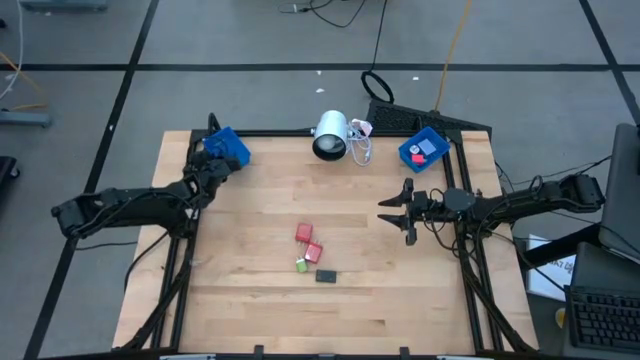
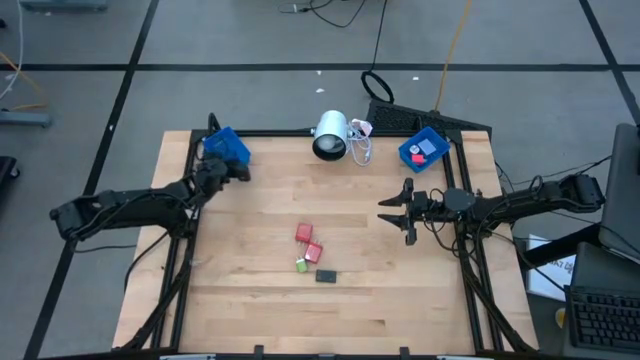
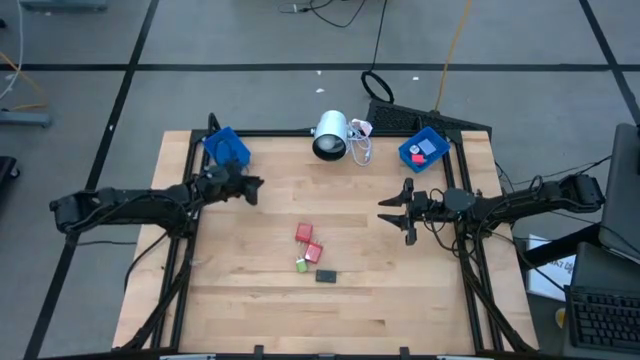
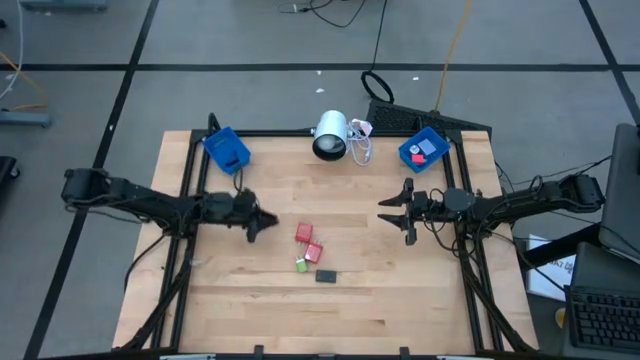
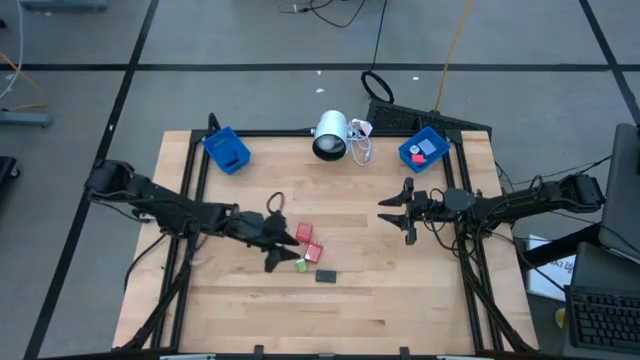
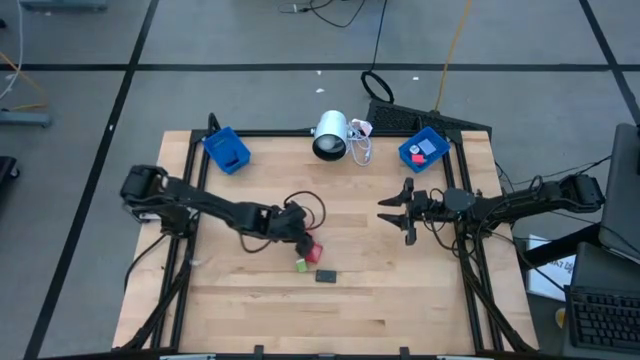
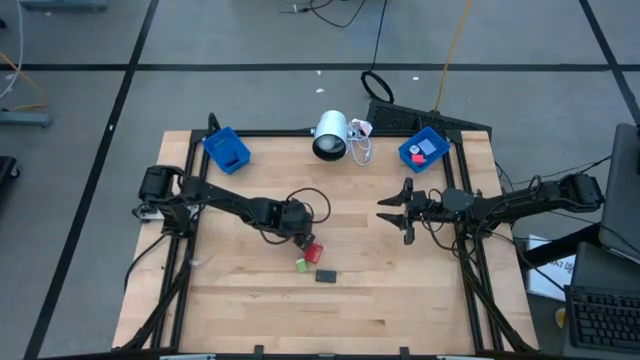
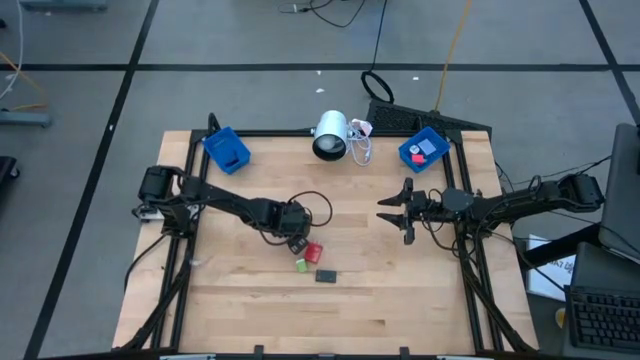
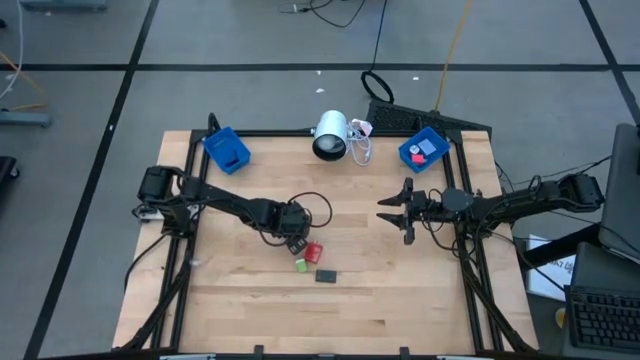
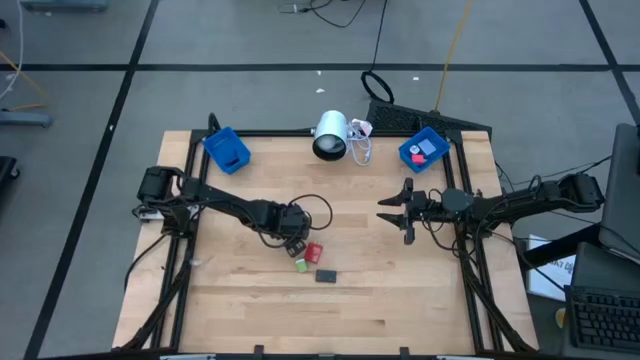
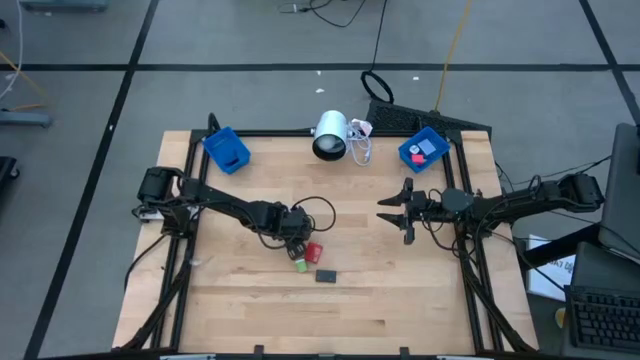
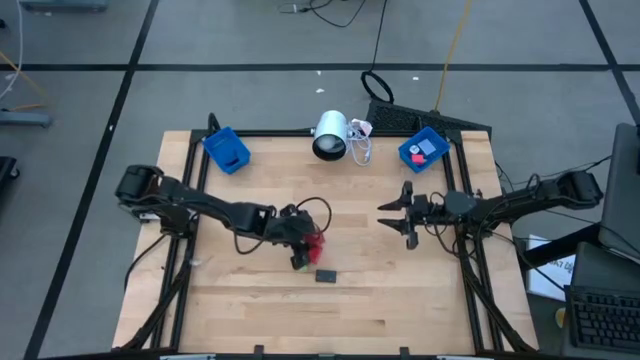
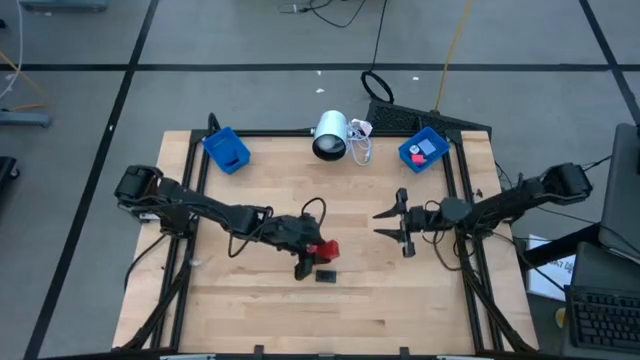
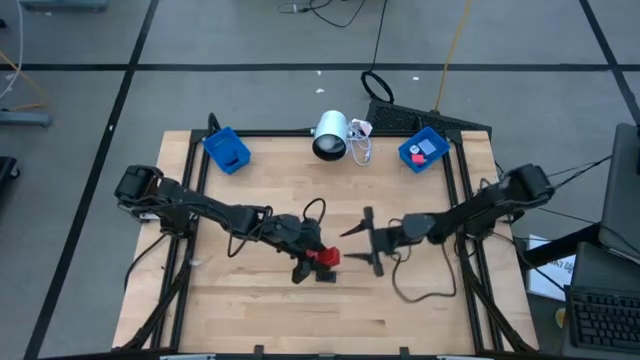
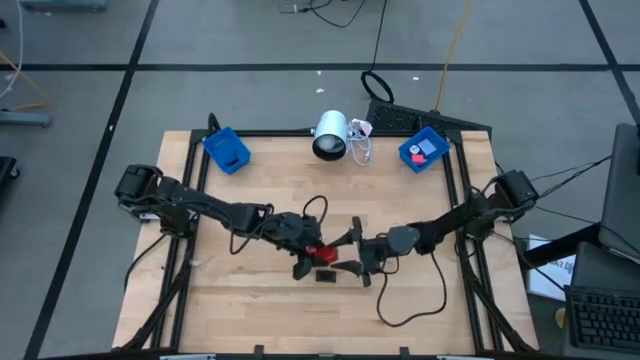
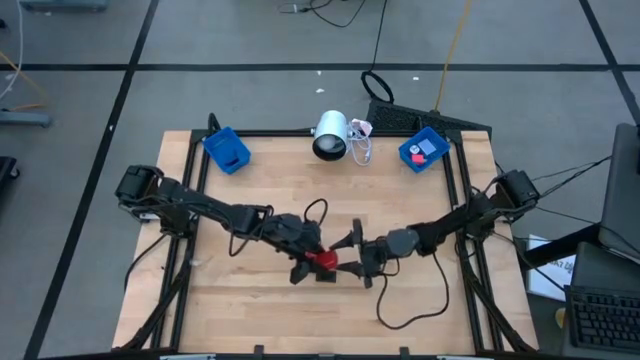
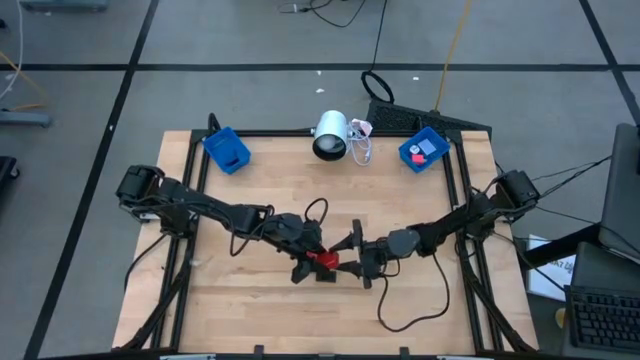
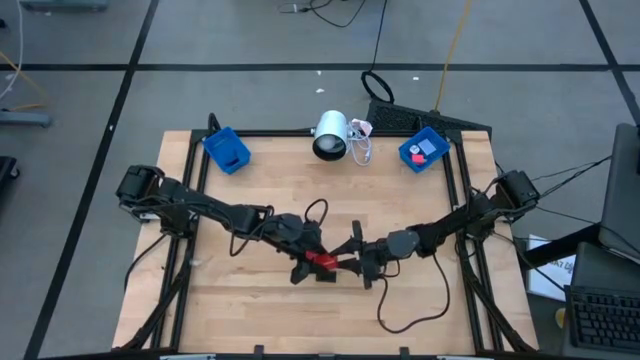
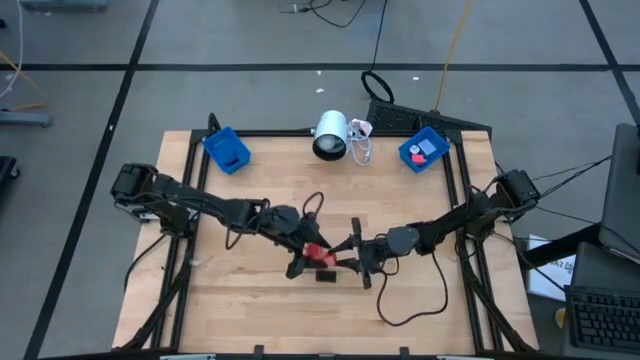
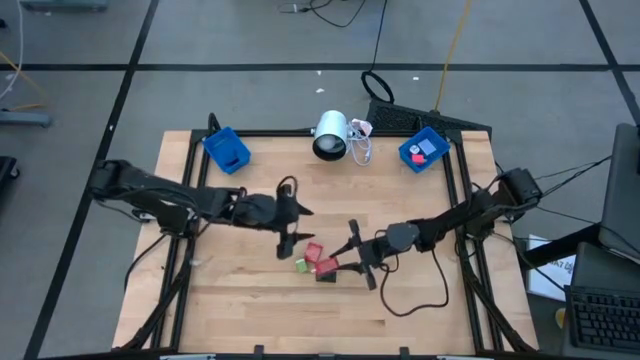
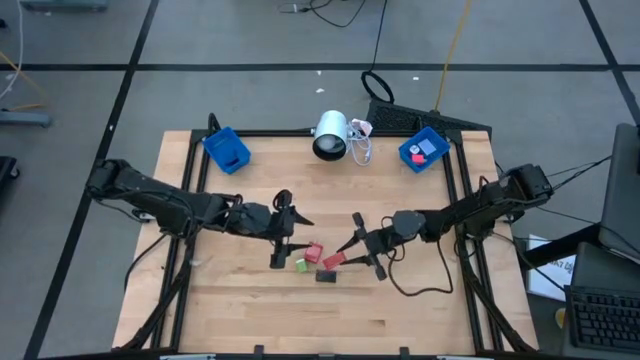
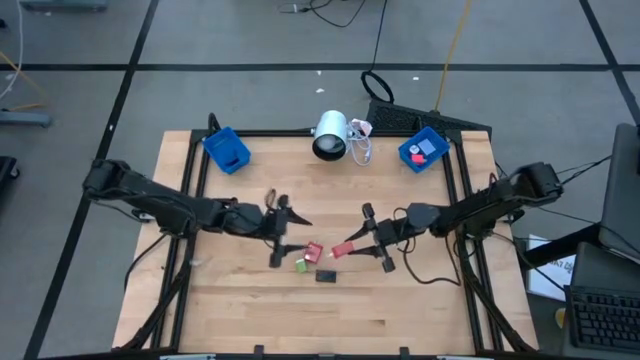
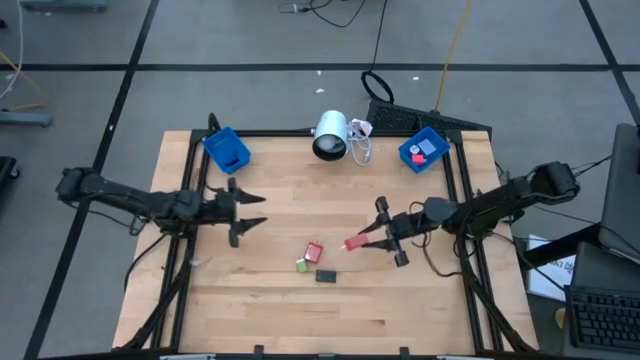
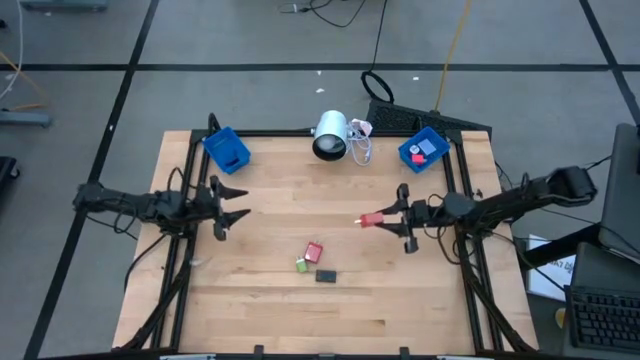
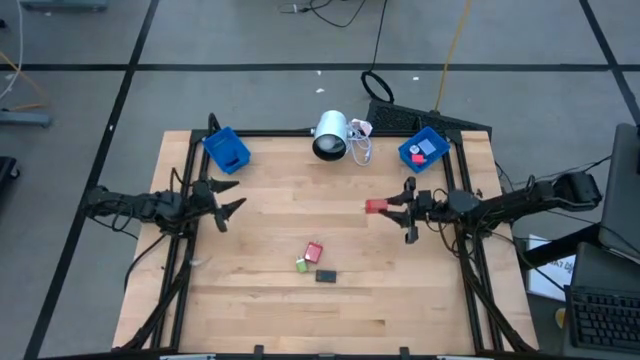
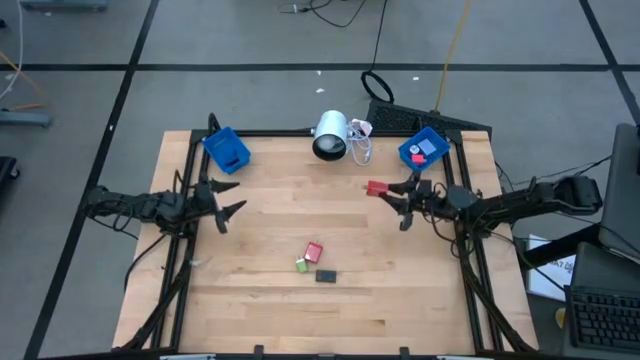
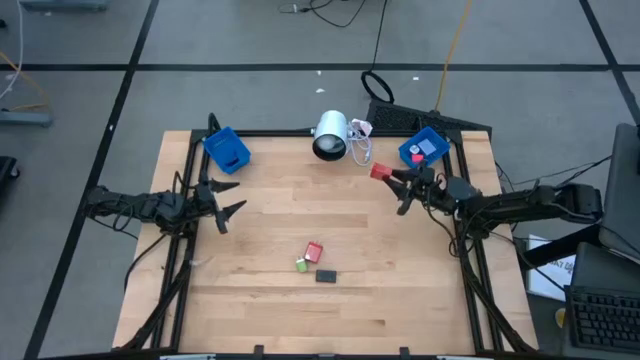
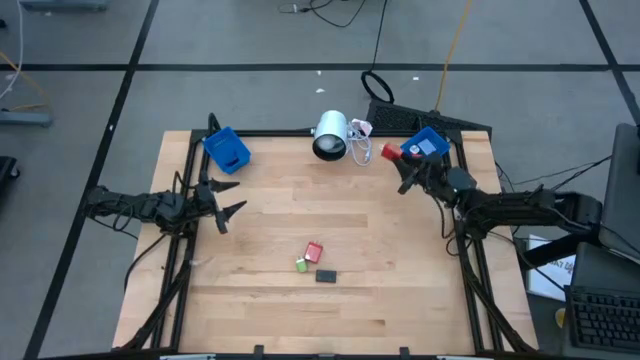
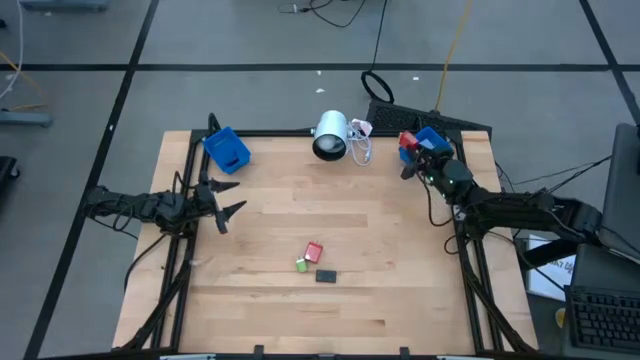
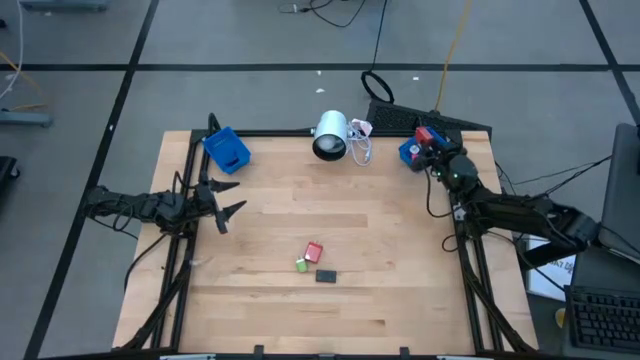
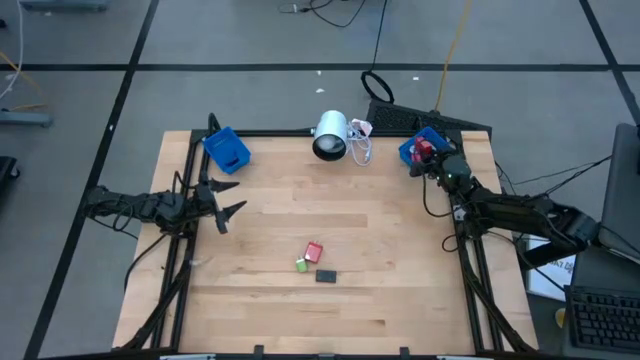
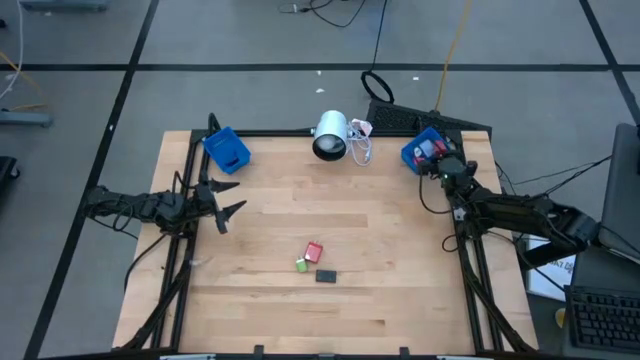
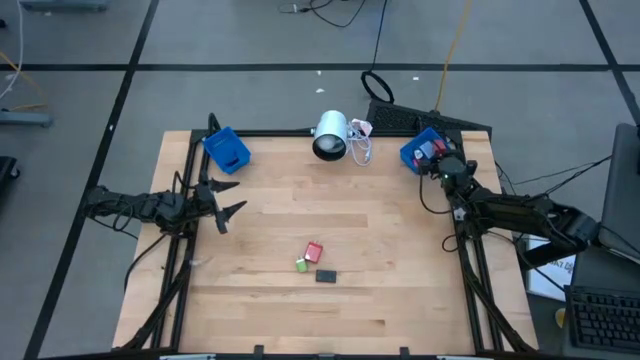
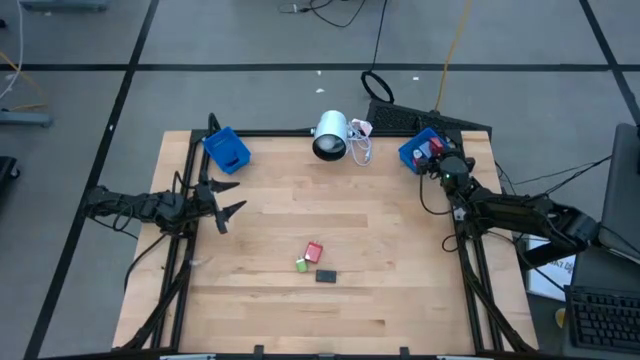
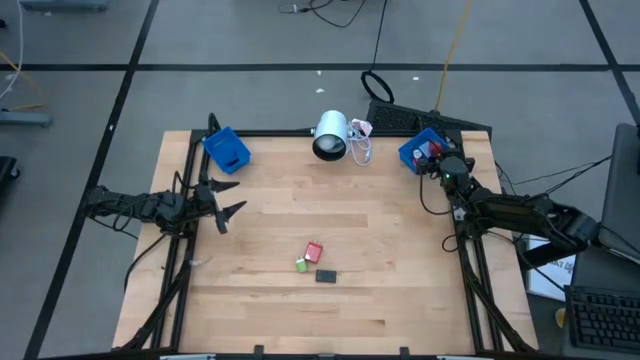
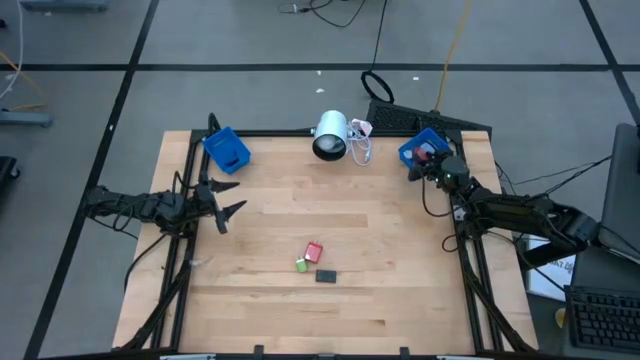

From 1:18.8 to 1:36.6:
Task: Pick & Place Office items
Put the top red charger adapter into the right blue bin

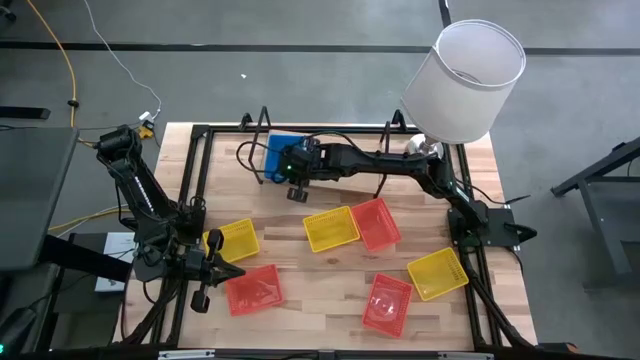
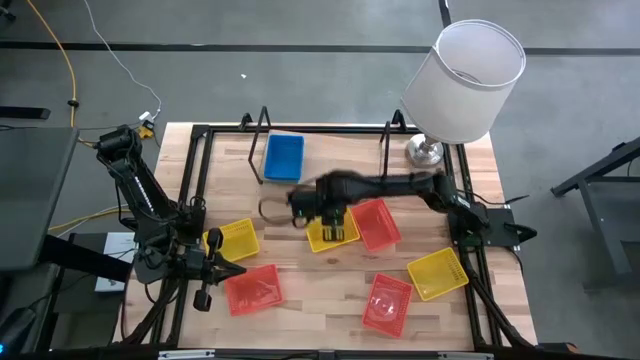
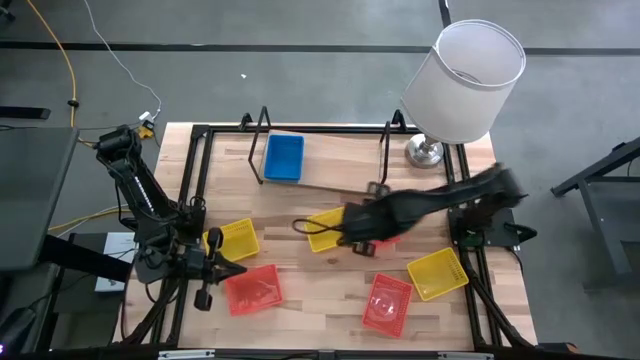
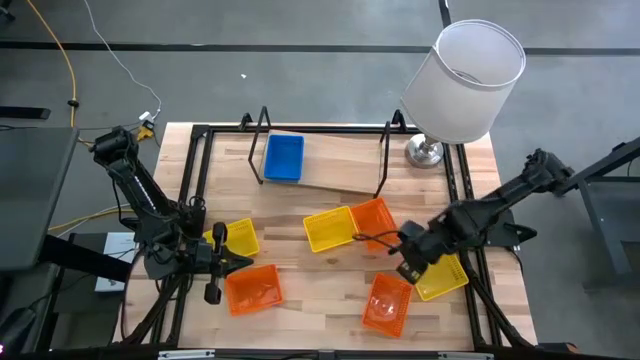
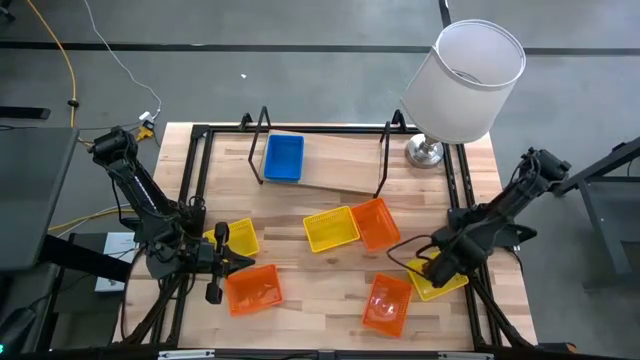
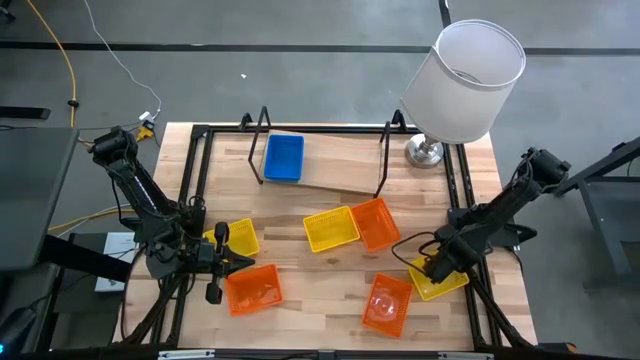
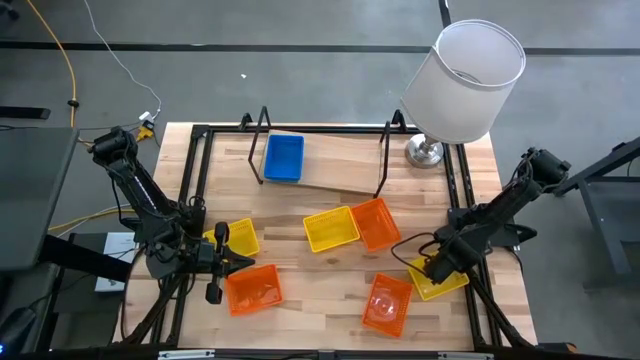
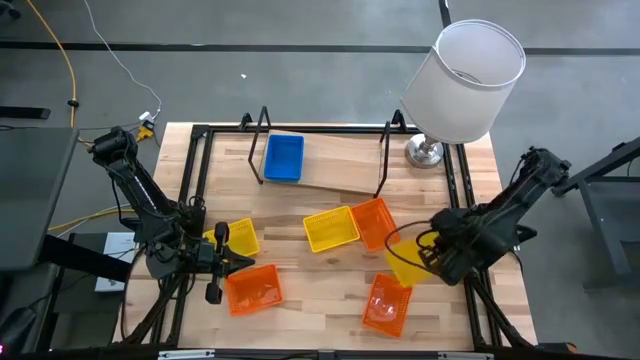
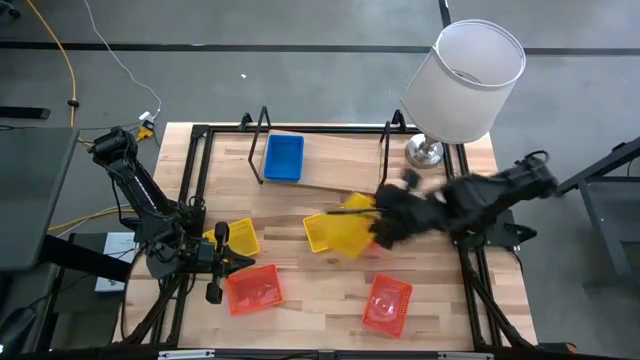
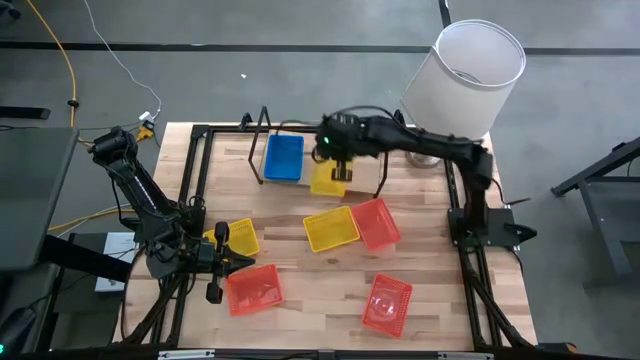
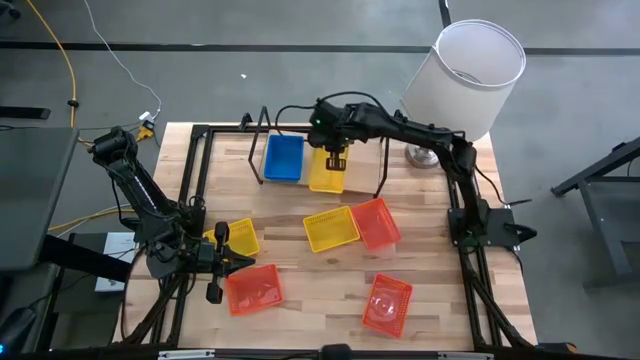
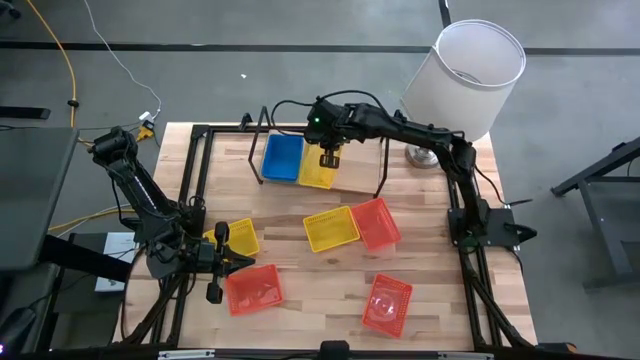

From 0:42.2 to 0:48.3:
Task: Stack baskets on shelf by color
Put the bottom right yellow bin on the shelf
